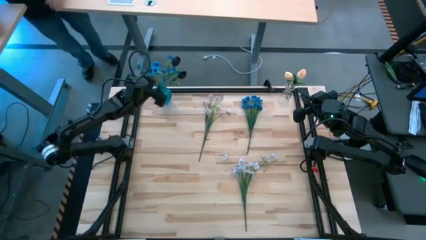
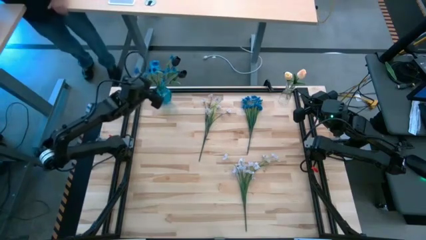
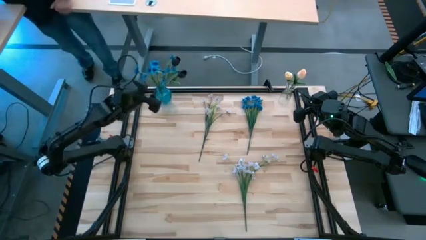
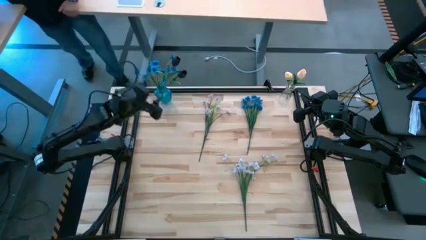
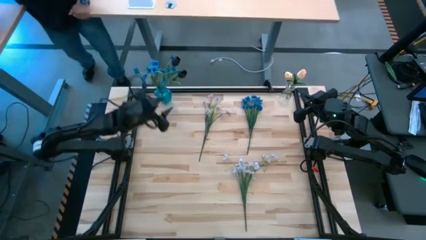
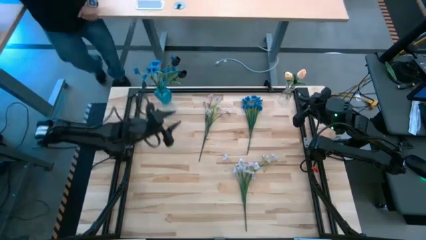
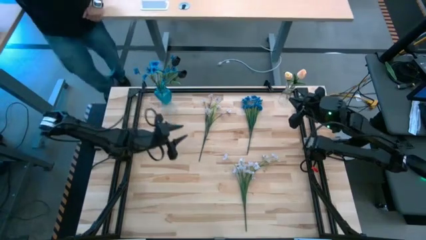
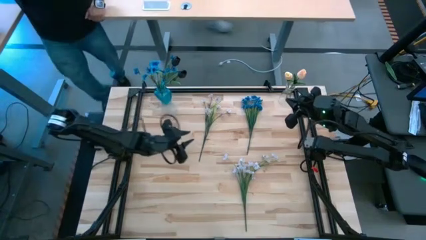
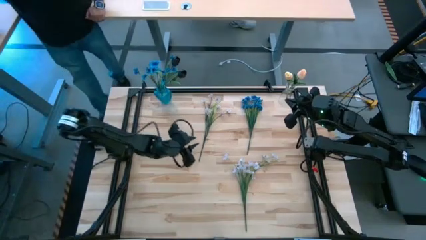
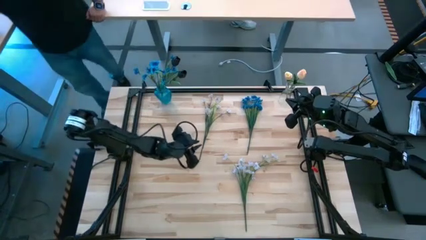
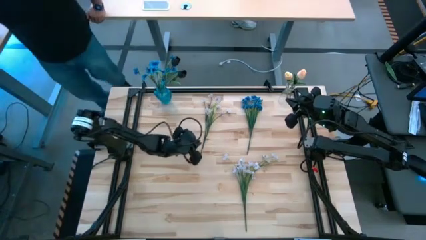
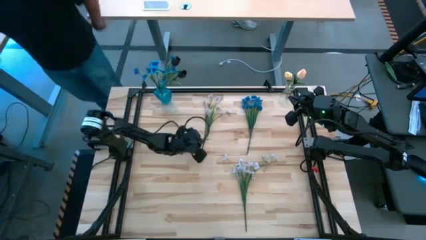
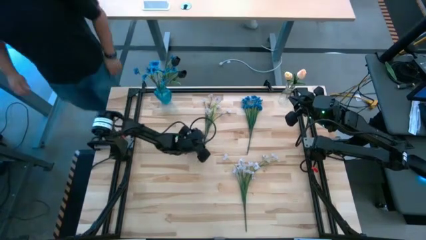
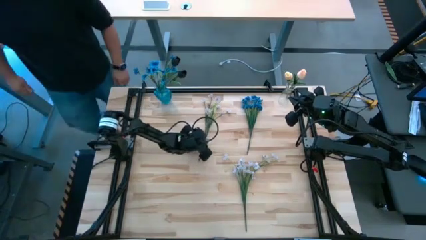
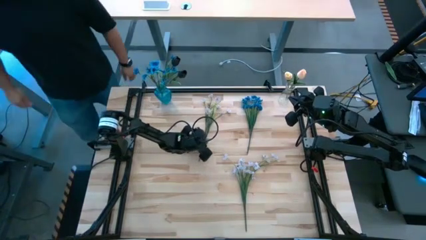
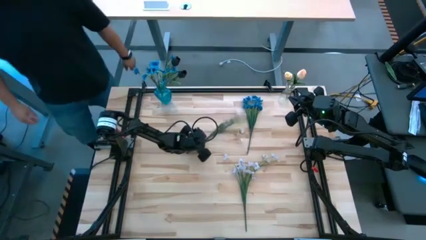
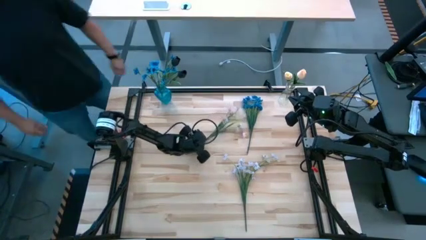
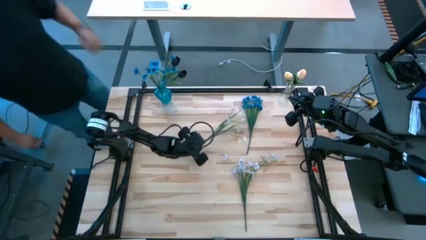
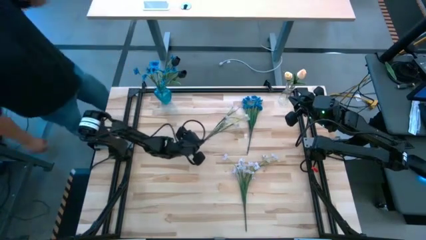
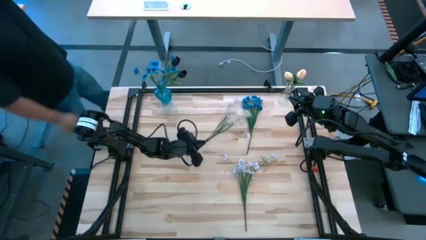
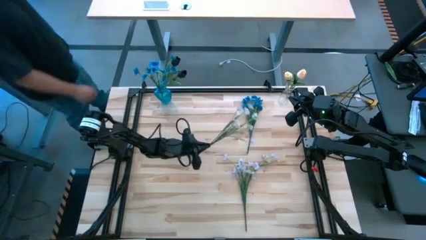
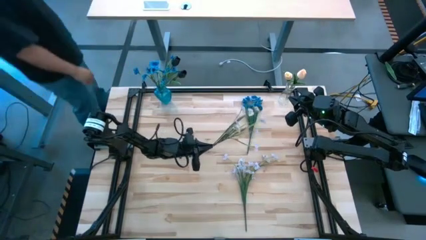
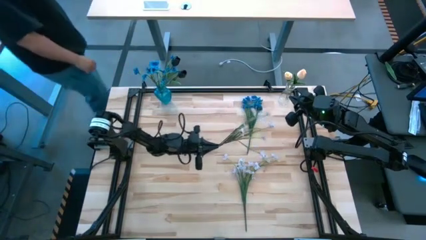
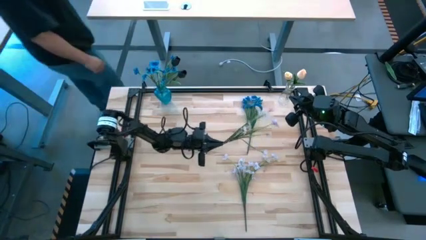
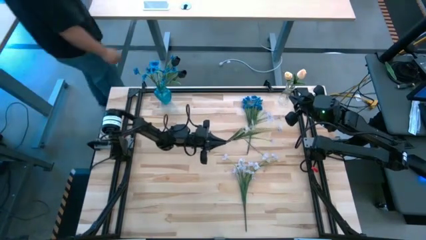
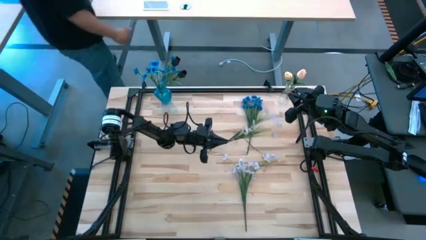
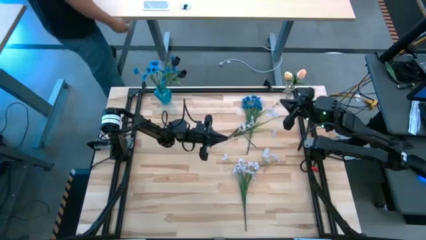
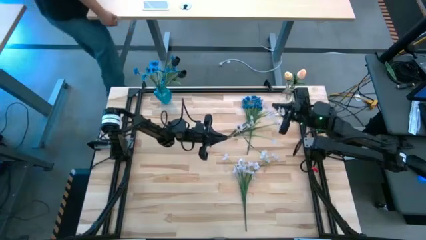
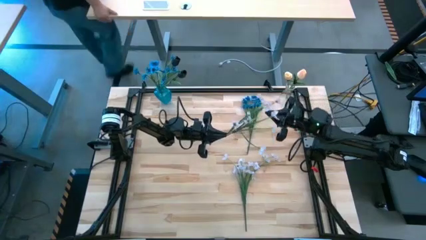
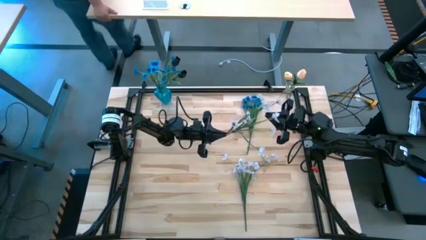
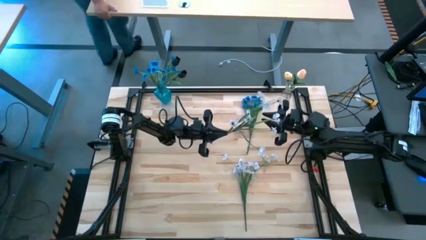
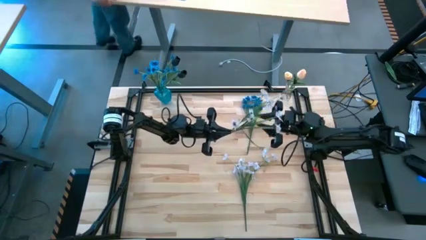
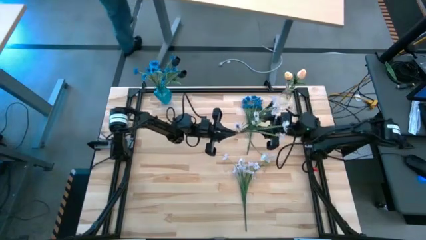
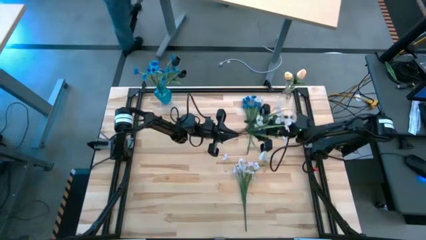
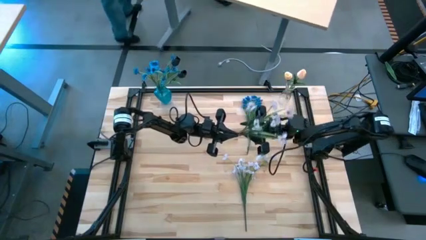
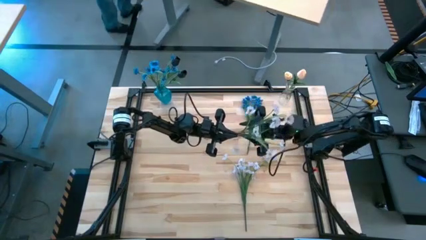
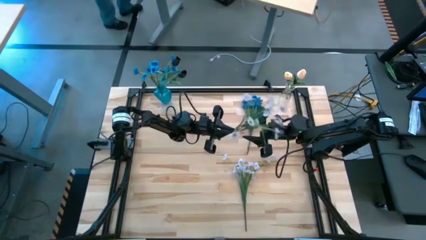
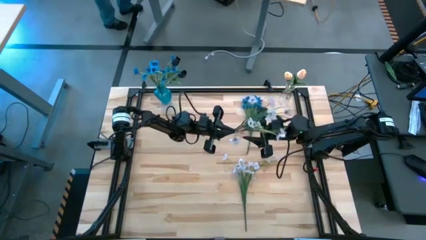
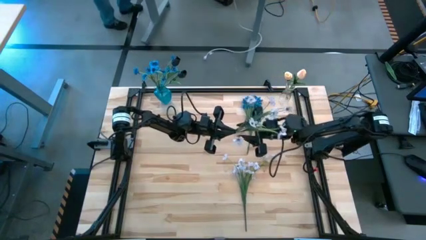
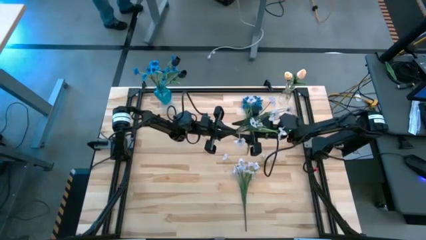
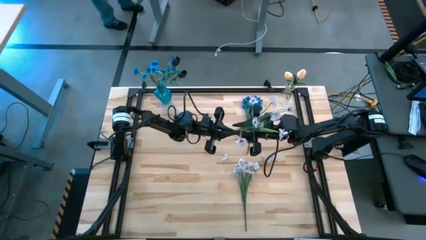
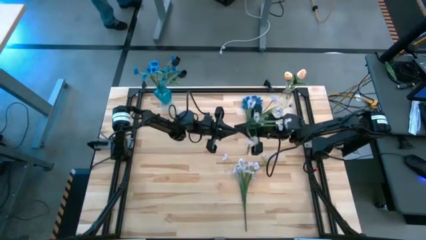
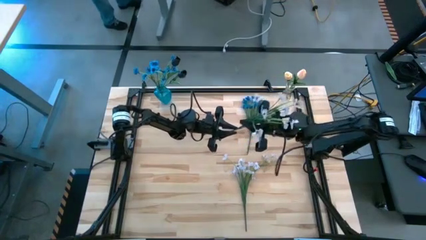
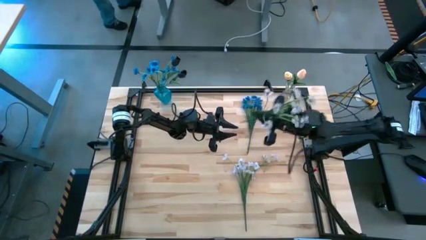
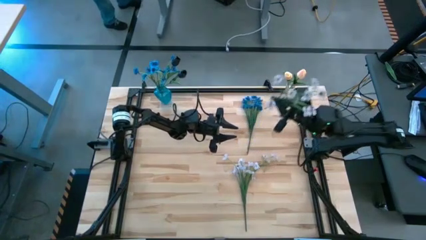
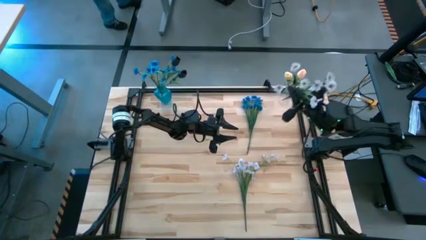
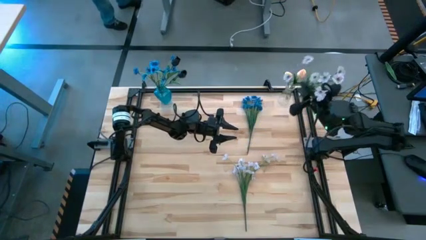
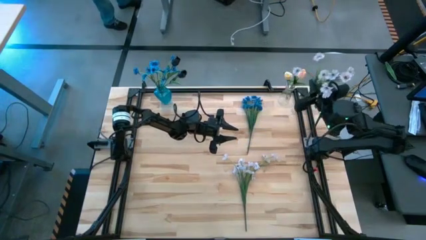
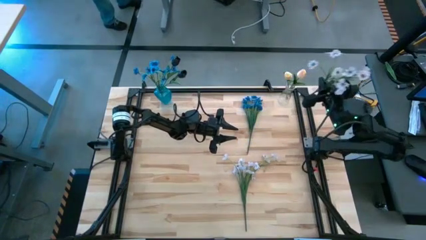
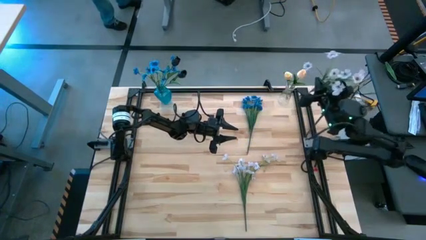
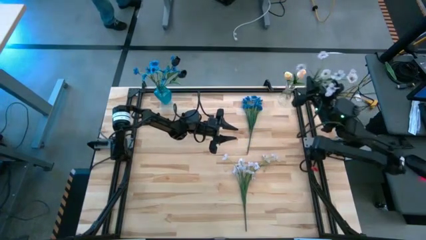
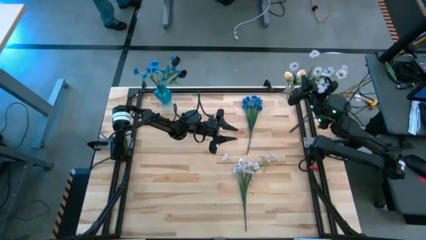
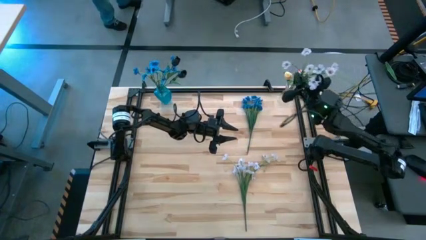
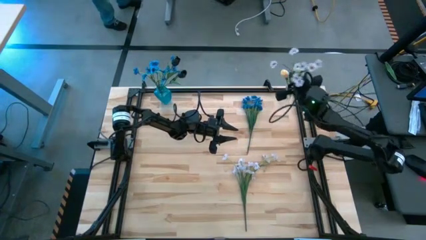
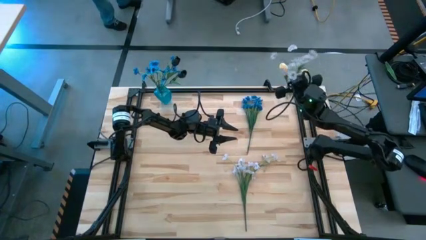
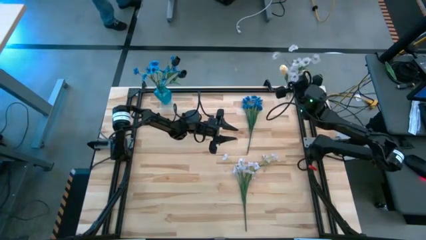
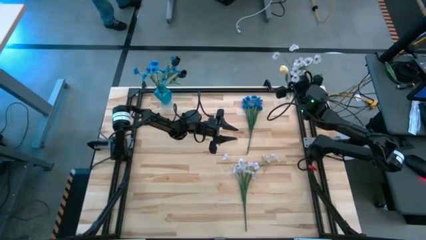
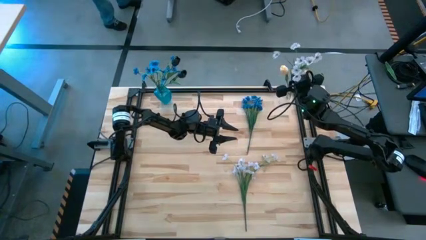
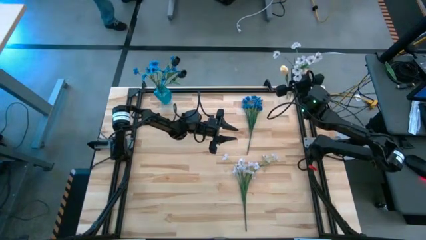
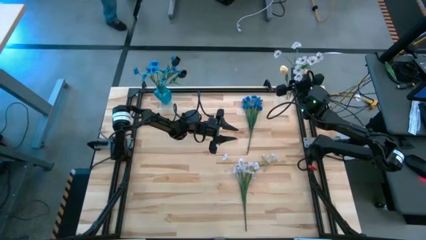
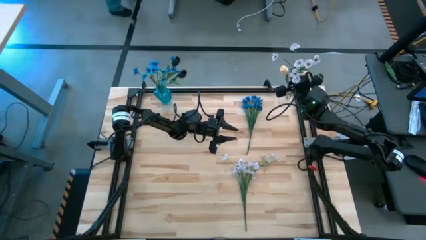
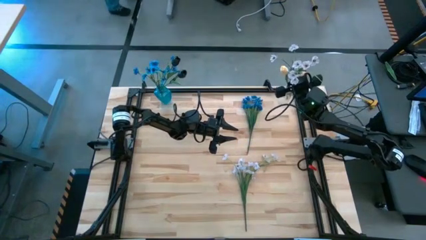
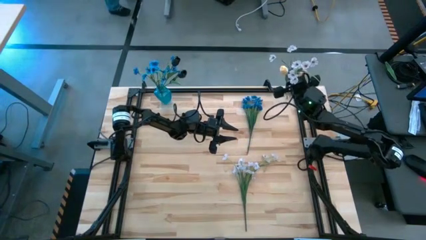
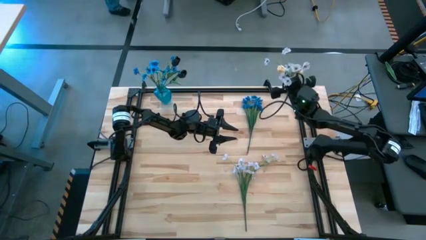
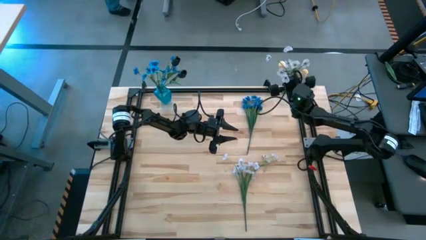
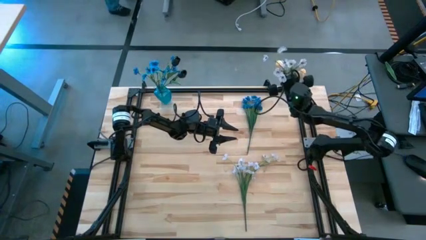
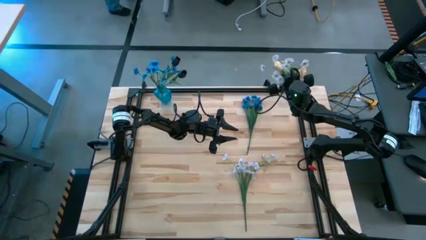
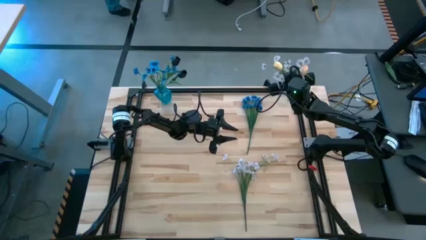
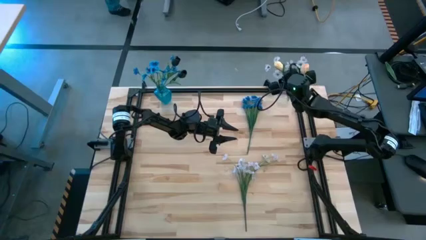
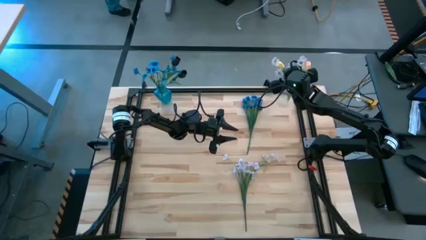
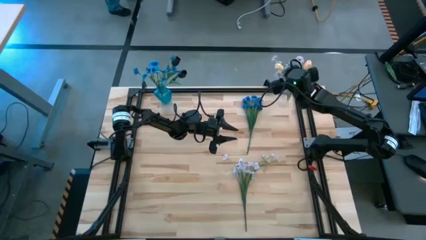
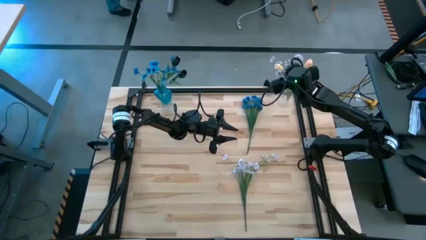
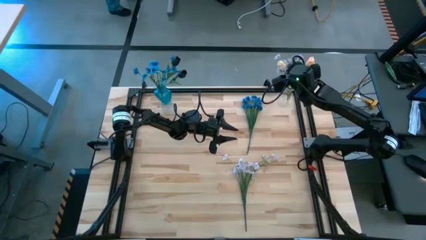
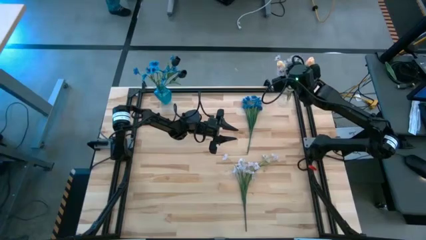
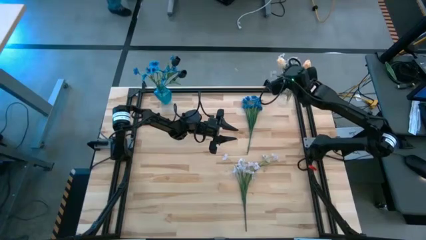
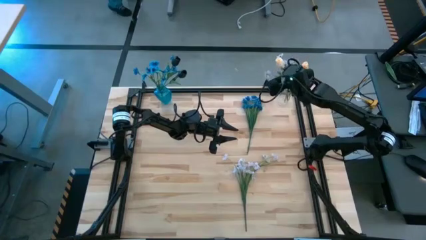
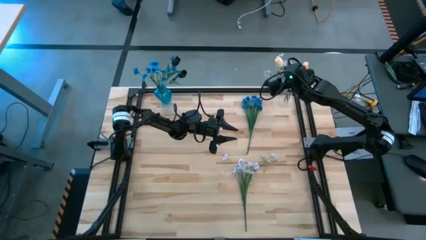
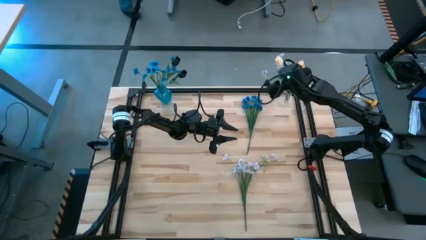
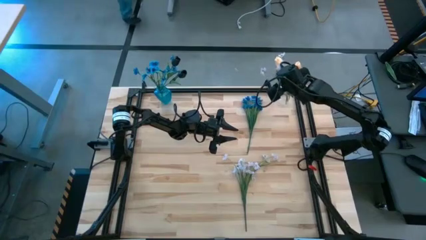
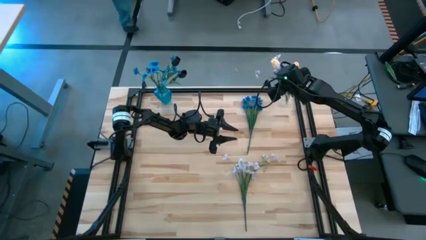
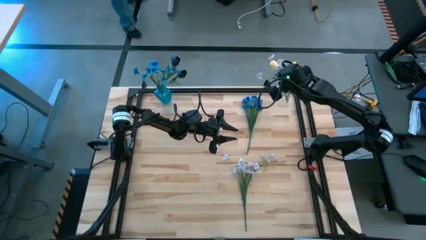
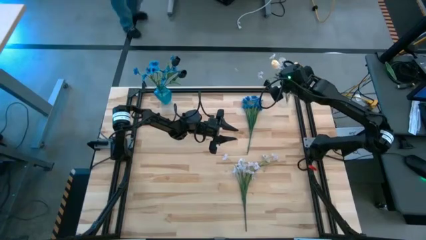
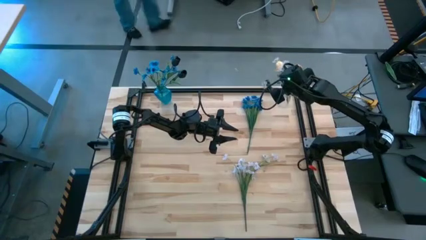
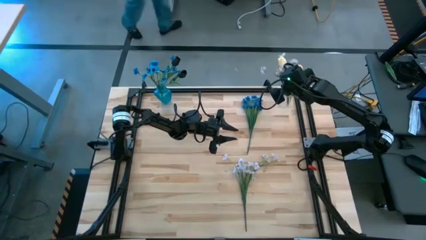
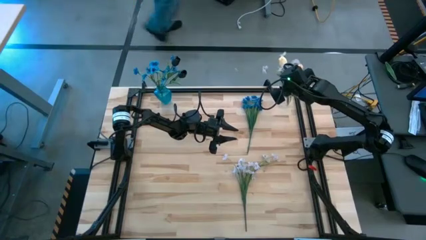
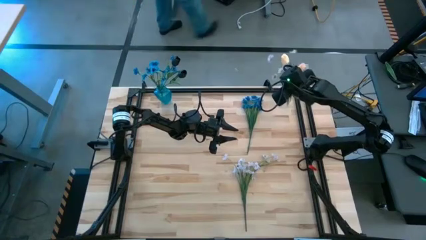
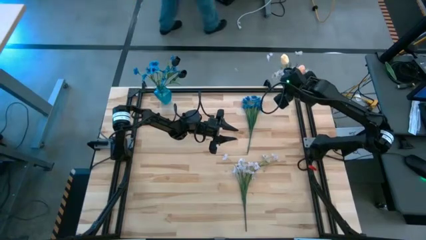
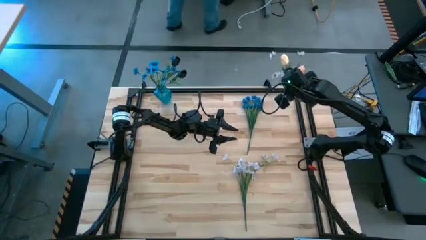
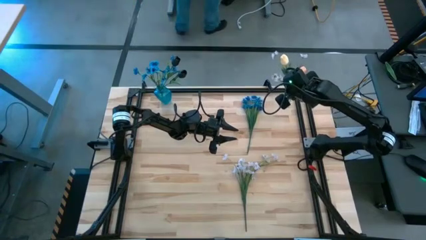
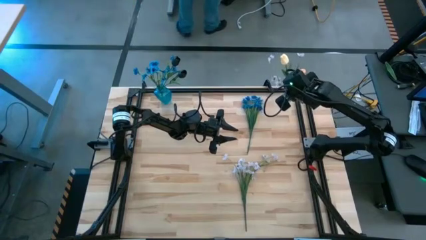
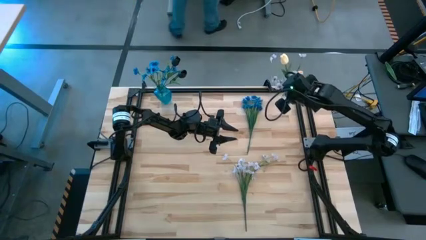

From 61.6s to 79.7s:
Task: Sort flowers into vase by color
Put the top white flowers into the transparent vase
